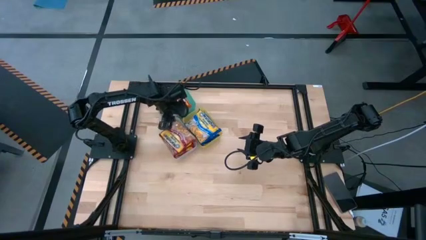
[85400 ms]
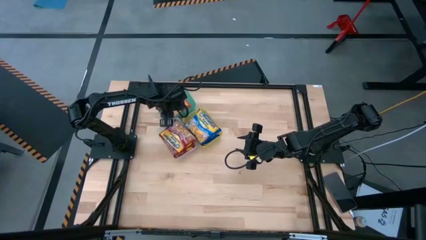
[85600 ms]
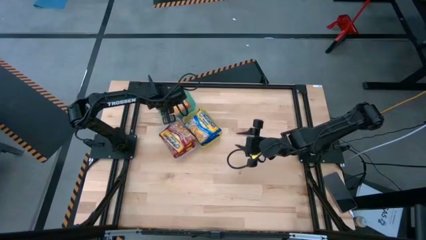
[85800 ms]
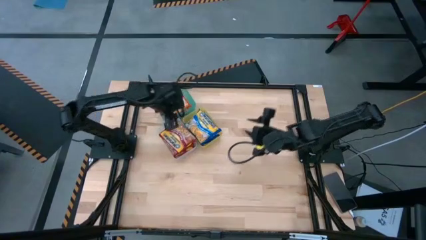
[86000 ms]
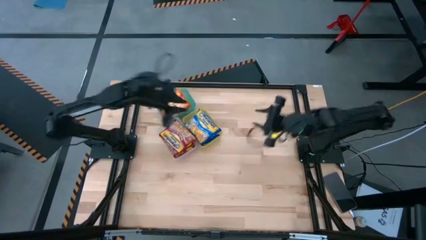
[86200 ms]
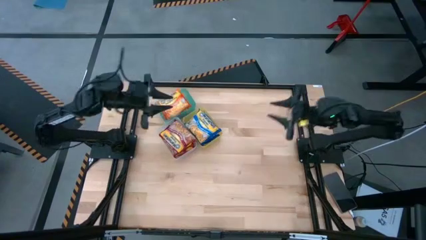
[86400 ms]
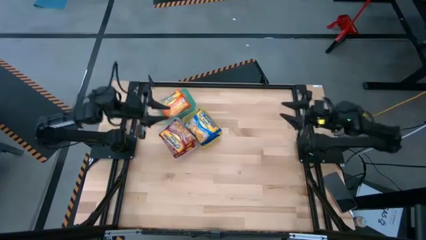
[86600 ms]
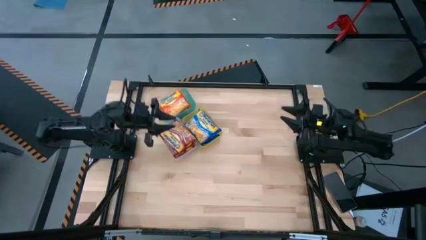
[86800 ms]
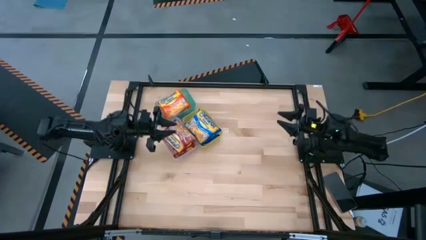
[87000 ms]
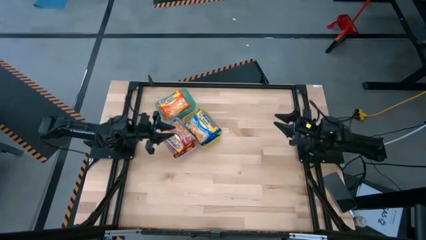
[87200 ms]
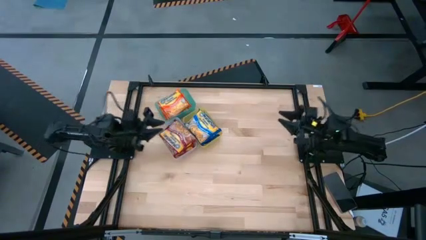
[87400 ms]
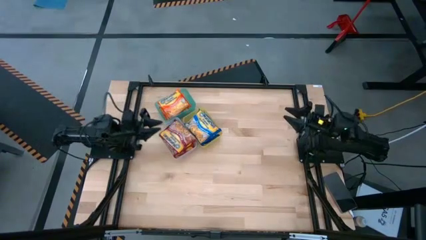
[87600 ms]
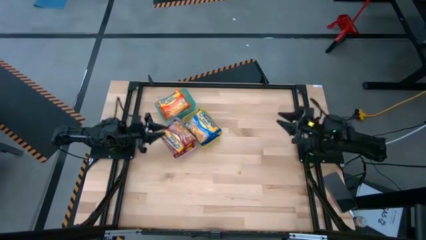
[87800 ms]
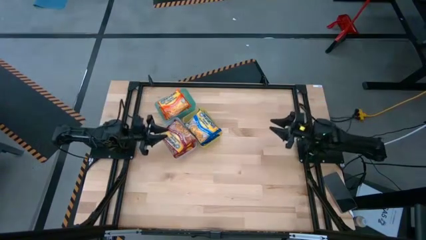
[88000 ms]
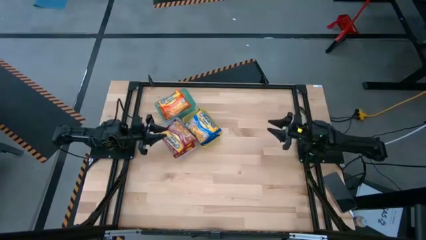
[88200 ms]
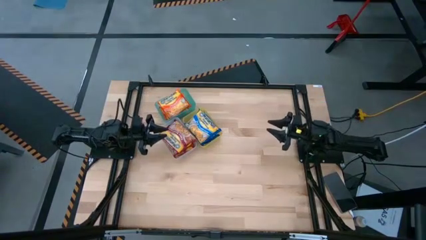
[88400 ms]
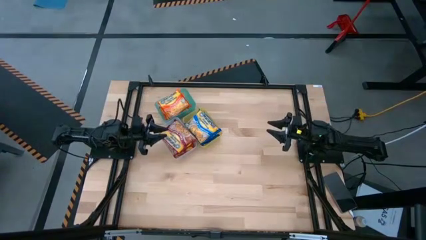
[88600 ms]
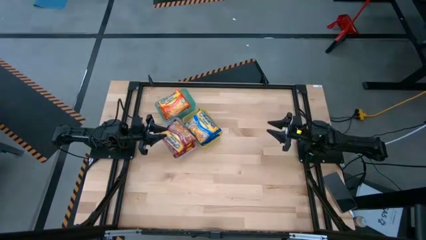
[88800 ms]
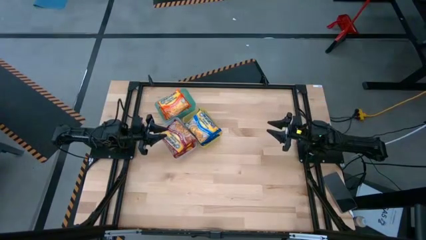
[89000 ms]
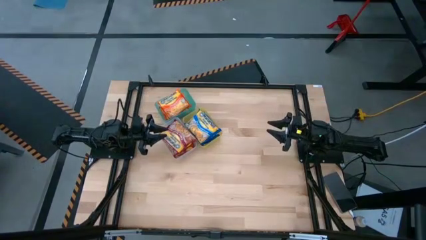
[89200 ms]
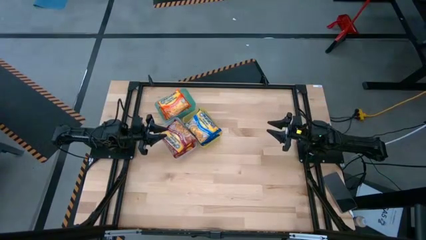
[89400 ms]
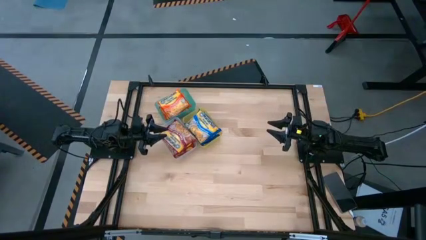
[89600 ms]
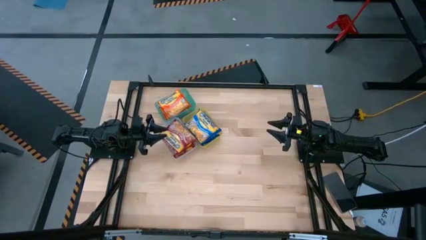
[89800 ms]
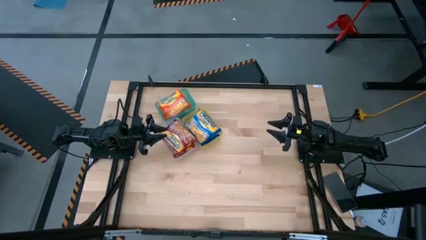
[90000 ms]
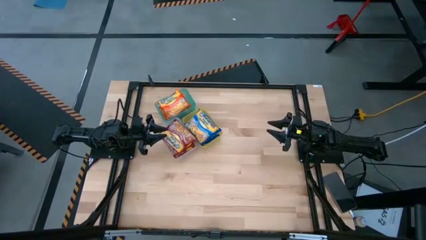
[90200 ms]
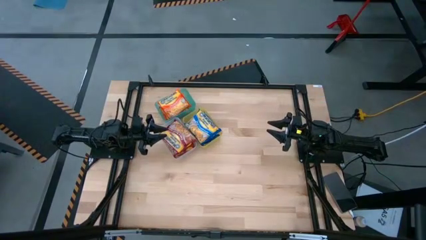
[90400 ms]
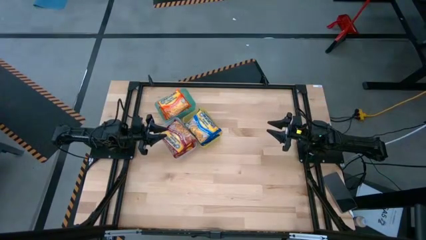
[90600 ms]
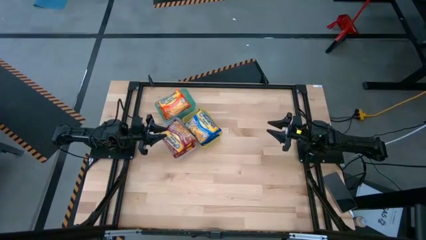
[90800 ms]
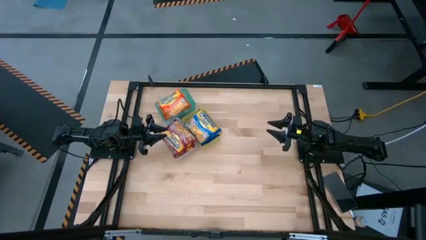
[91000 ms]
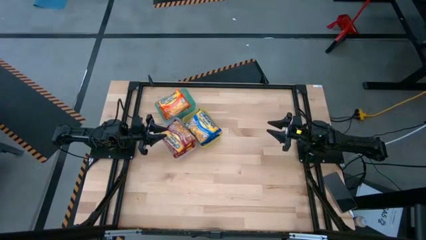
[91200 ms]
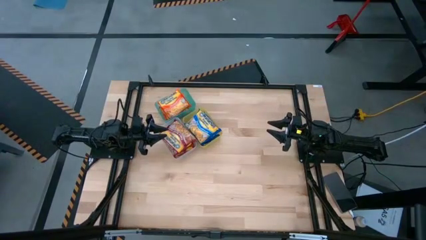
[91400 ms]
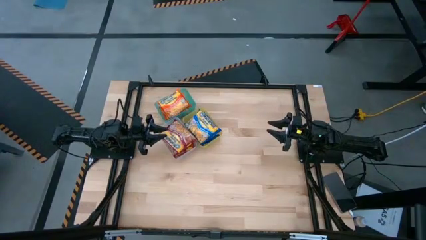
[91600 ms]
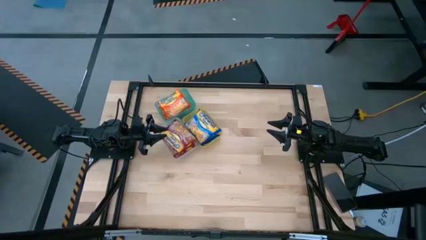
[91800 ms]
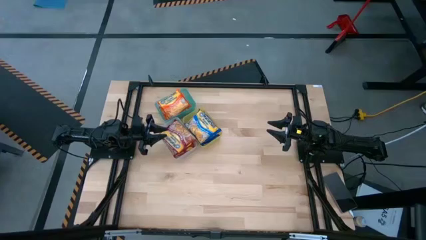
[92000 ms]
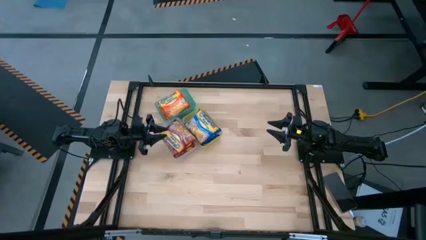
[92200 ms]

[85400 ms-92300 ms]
Task: Sort Maruchan noodles
Return to home position

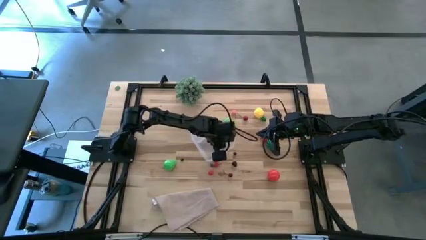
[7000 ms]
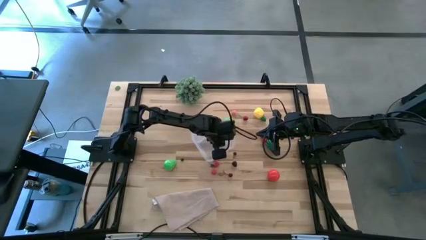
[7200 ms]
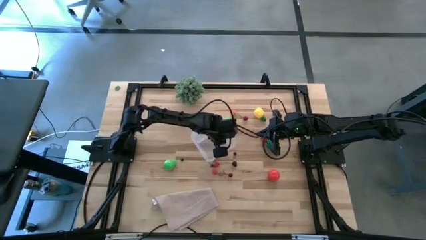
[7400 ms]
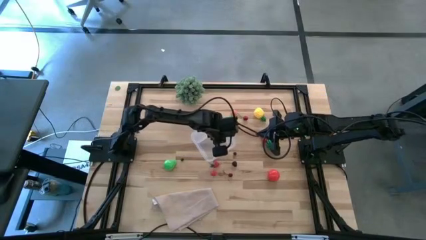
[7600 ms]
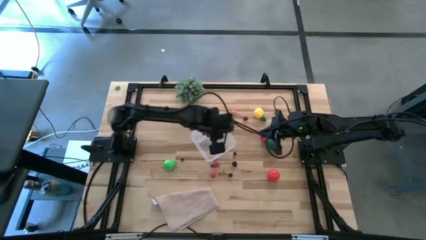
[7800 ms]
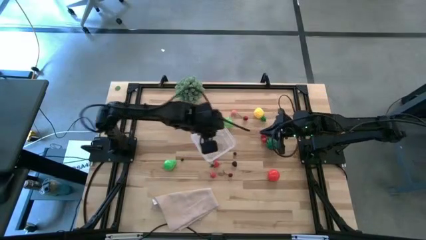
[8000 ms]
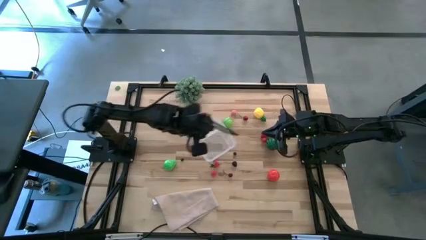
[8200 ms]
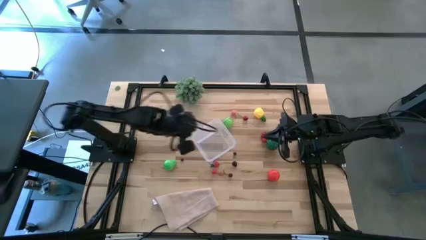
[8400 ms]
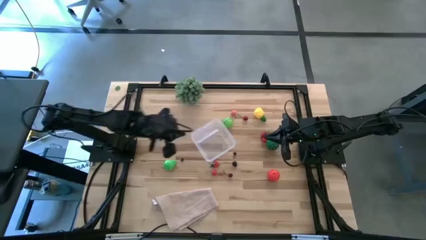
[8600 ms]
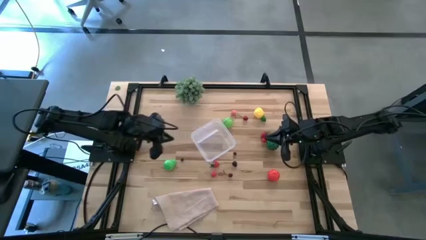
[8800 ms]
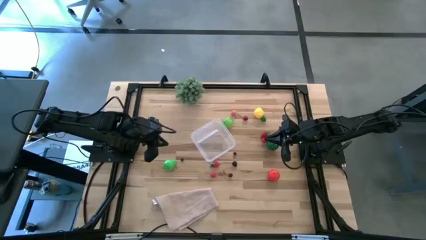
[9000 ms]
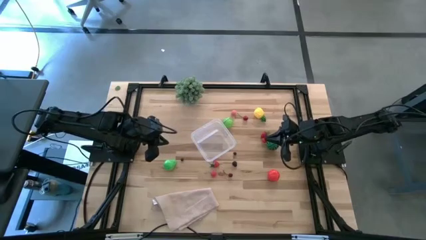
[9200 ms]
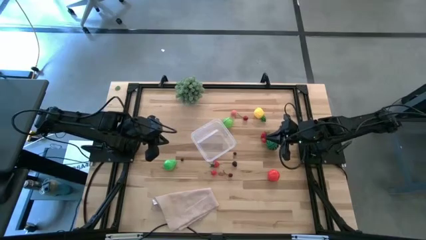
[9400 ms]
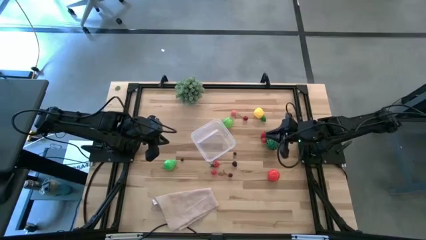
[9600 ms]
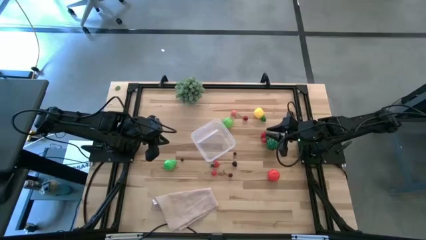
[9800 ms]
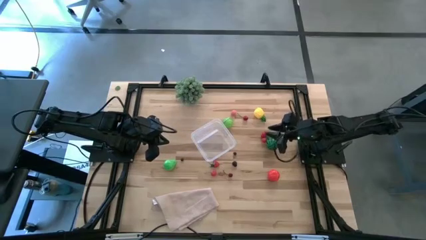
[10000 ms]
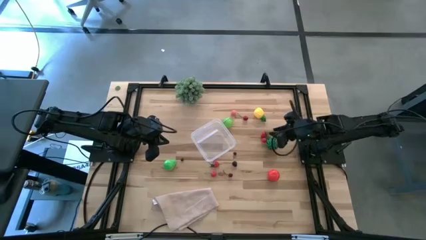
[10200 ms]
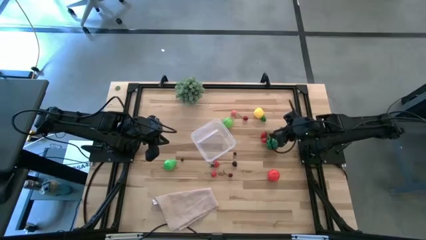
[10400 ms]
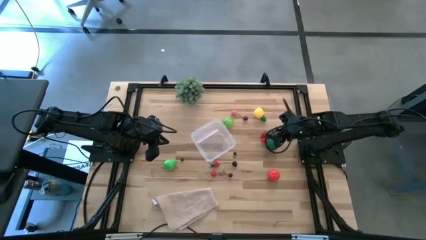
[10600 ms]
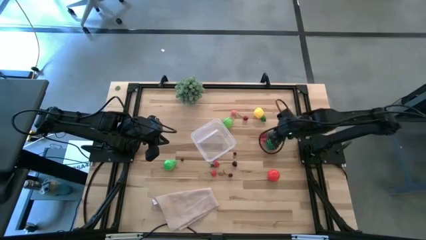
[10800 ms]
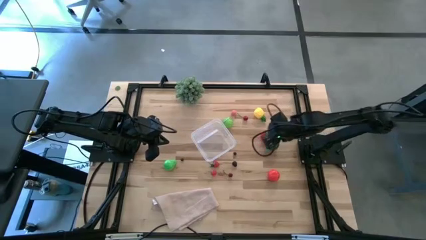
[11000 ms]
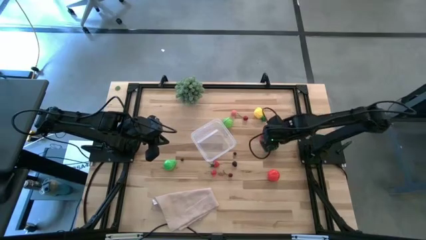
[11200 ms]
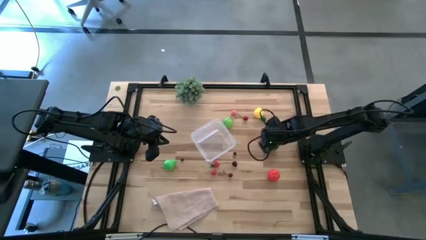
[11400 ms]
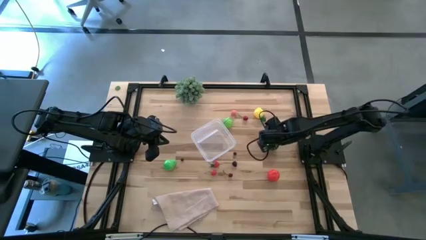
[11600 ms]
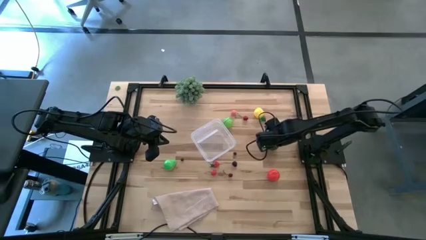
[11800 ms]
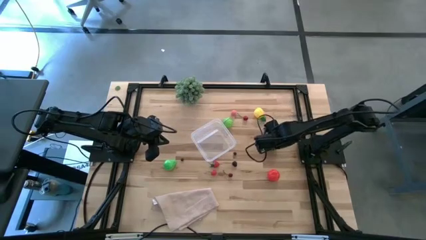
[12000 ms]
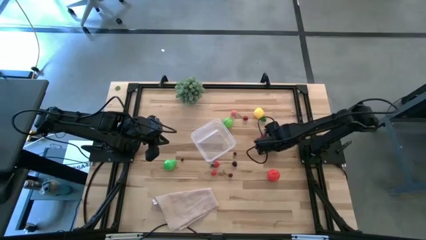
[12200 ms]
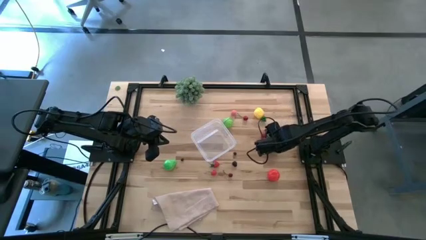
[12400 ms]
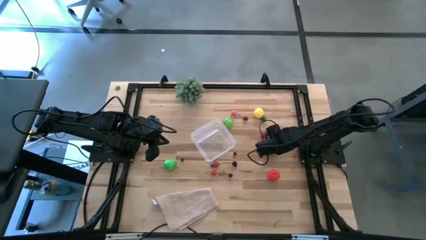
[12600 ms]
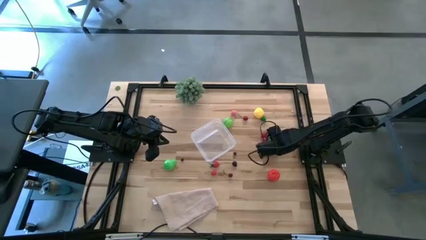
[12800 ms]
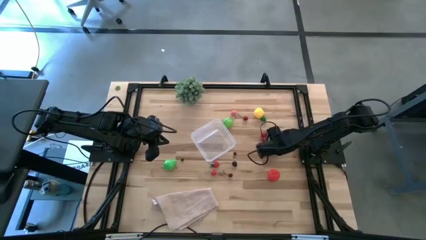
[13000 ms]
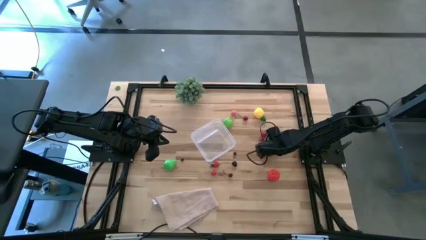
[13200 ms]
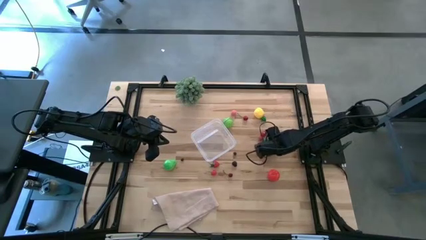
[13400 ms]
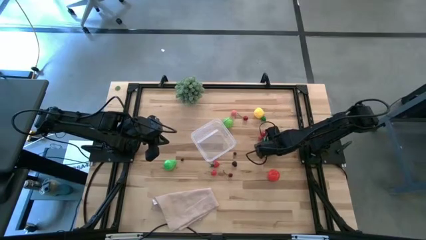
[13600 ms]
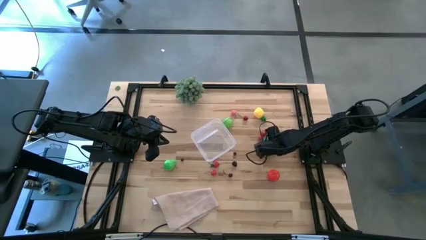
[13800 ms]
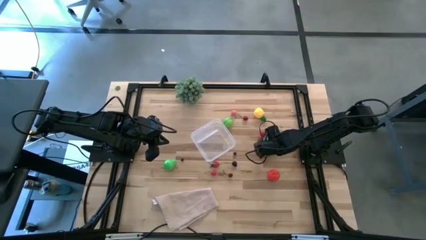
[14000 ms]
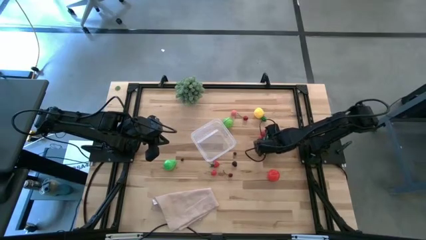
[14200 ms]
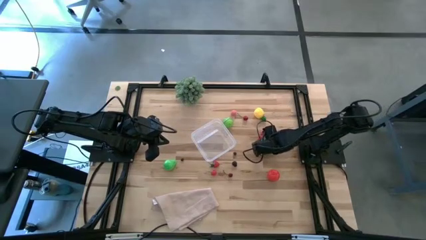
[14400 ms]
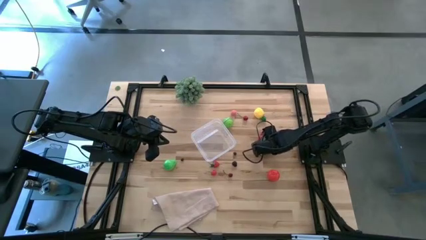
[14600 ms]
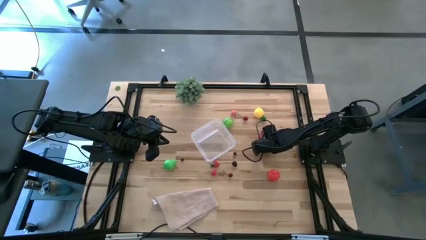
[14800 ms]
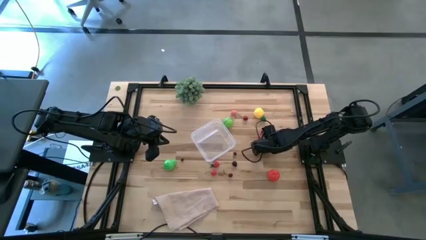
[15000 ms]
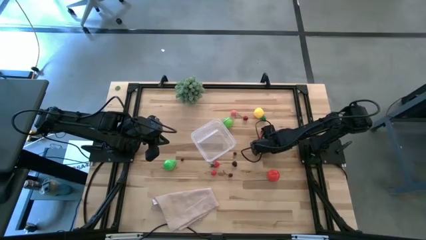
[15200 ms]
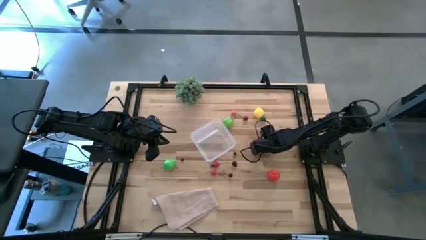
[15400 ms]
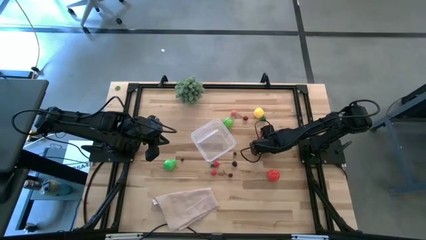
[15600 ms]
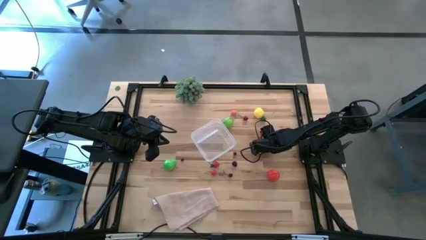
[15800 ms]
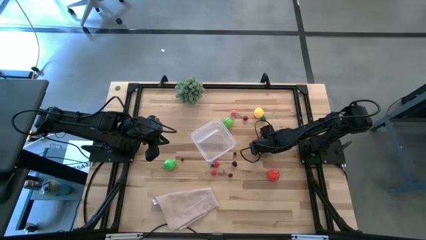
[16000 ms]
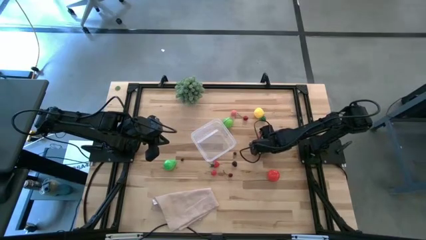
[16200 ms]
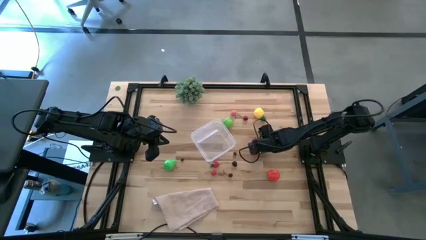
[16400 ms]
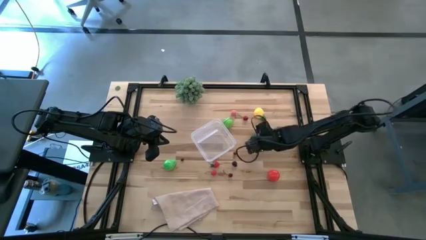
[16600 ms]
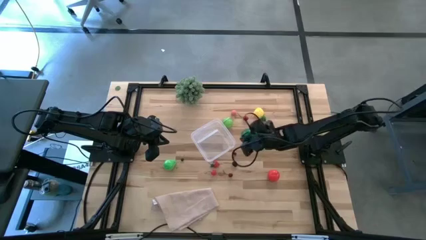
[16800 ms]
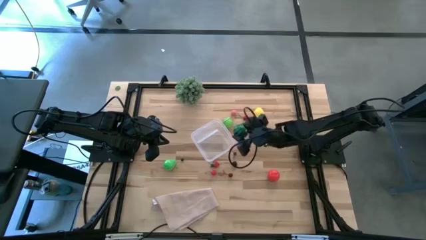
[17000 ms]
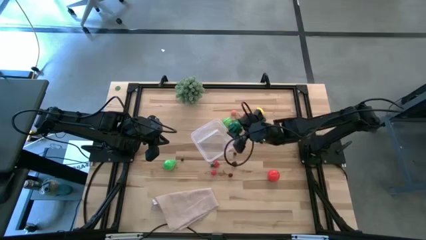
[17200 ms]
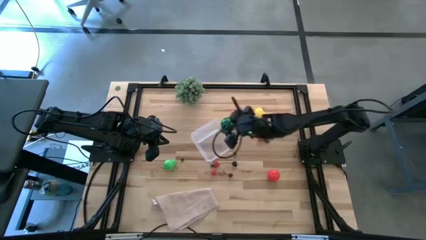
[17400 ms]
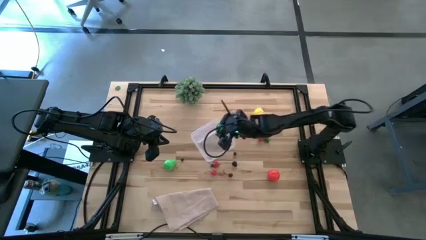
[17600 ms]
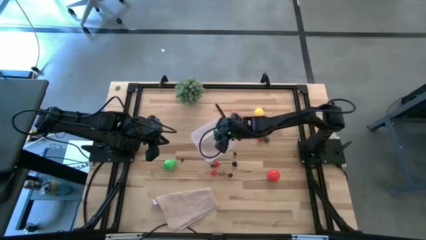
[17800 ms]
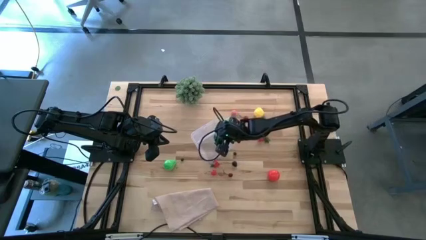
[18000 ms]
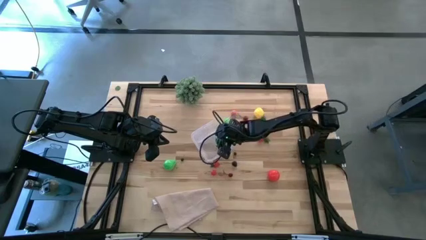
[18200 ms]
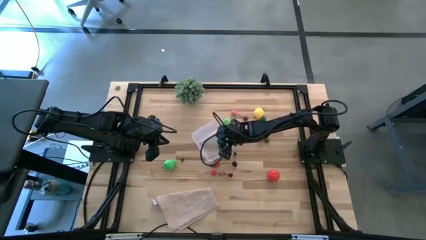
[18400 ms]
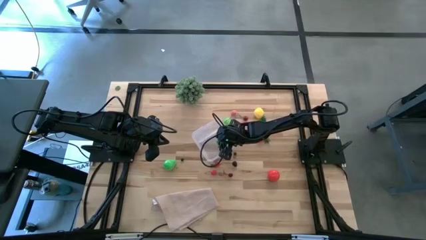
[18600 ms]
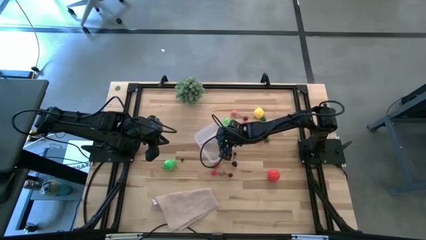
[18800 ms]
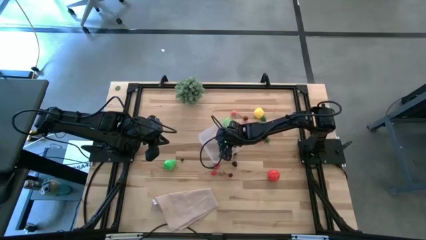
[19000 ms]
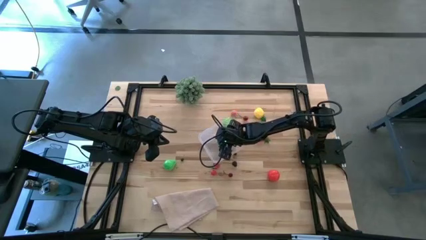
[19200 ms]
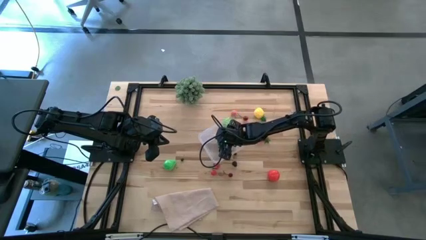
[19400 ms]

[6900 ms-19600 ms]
Task: Pick and placing Produce into tupperware
Put the green watermelon into the transparent bin
